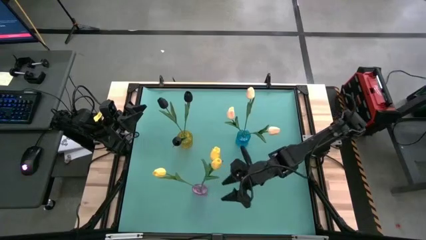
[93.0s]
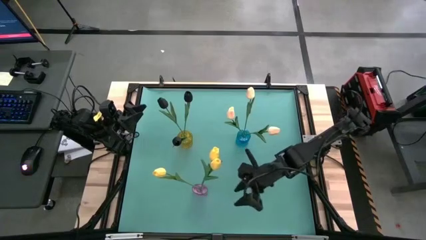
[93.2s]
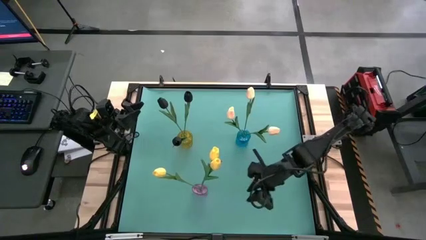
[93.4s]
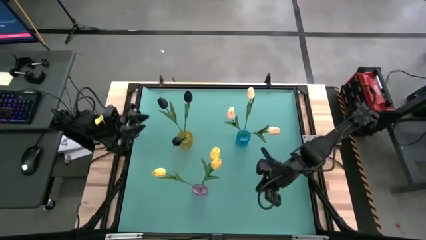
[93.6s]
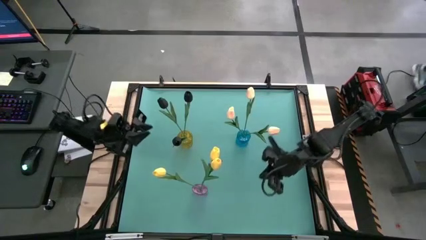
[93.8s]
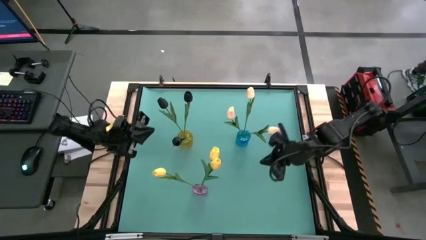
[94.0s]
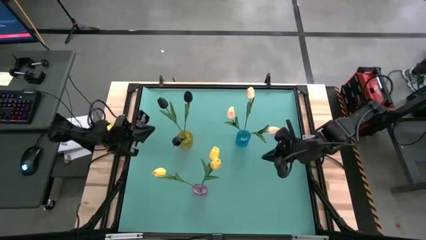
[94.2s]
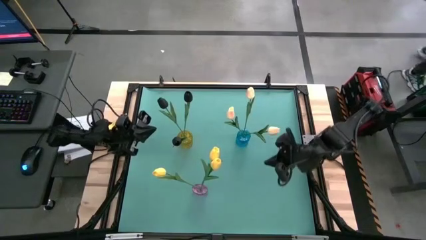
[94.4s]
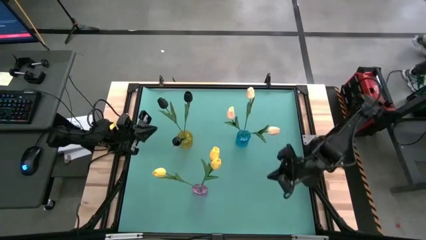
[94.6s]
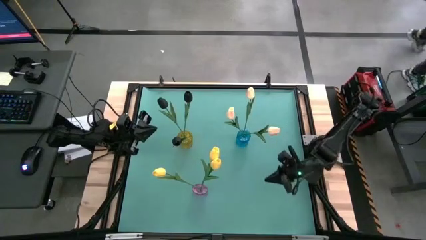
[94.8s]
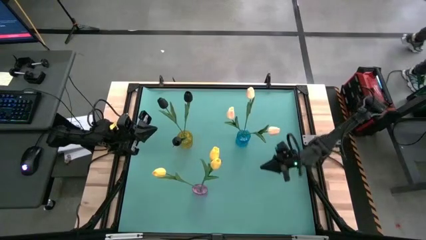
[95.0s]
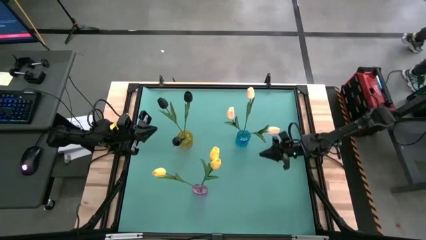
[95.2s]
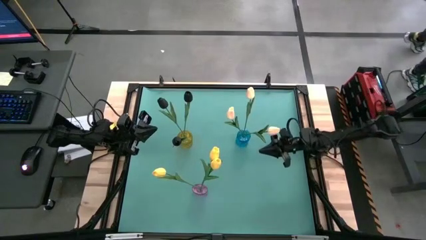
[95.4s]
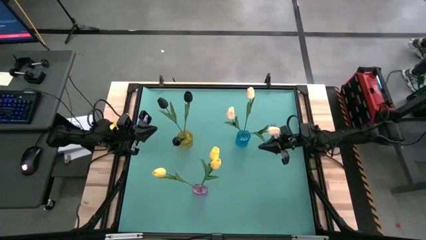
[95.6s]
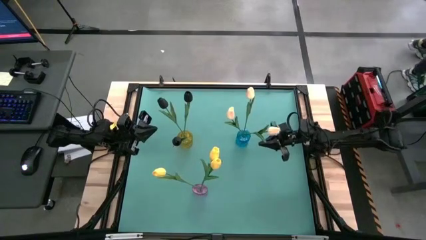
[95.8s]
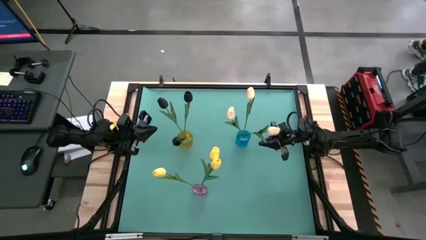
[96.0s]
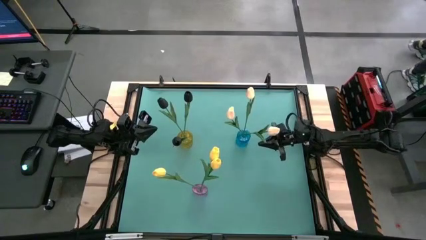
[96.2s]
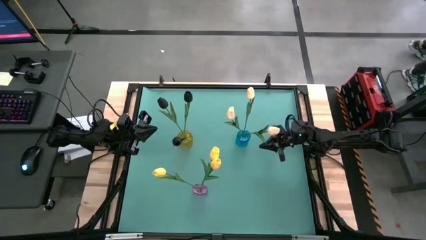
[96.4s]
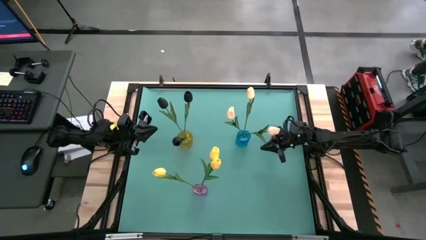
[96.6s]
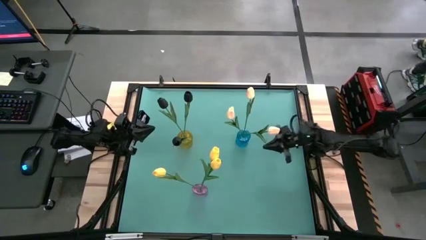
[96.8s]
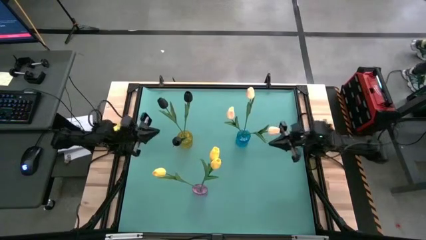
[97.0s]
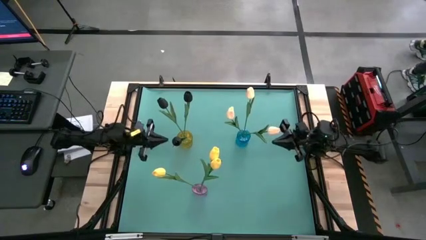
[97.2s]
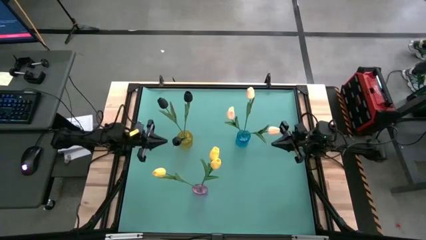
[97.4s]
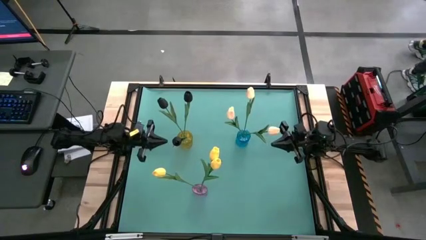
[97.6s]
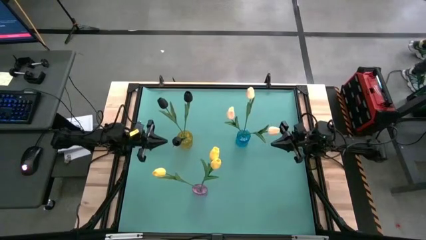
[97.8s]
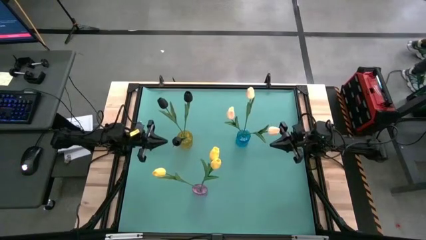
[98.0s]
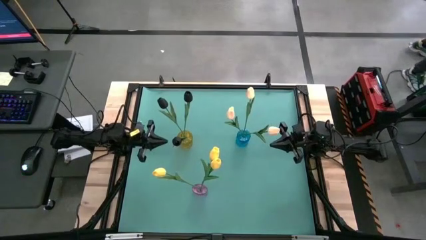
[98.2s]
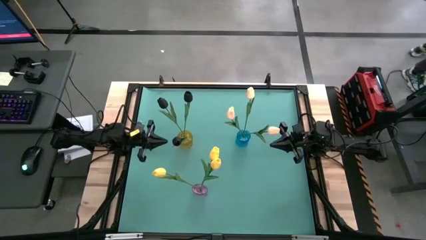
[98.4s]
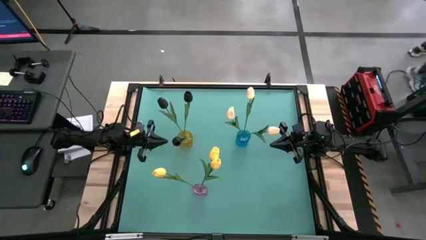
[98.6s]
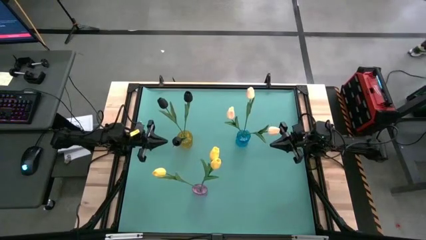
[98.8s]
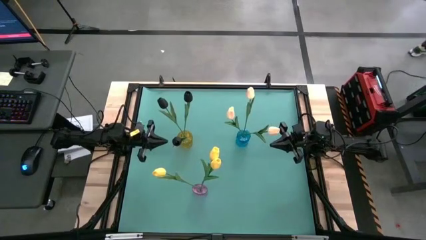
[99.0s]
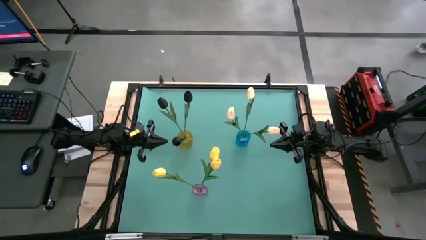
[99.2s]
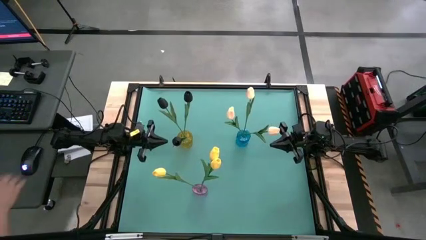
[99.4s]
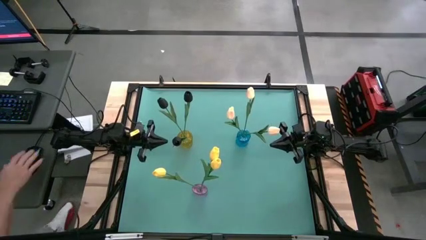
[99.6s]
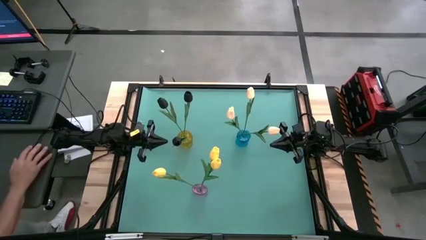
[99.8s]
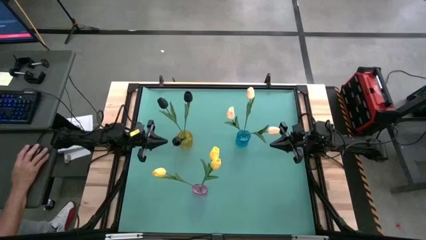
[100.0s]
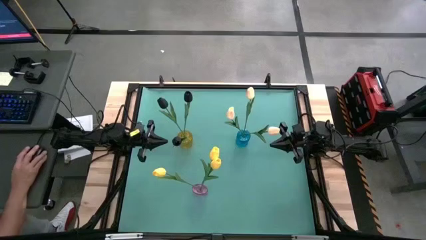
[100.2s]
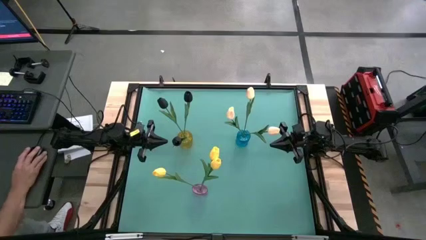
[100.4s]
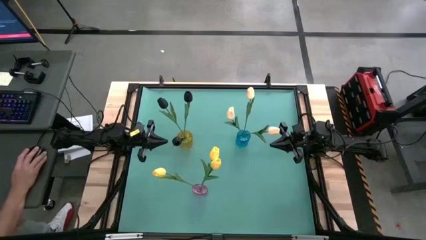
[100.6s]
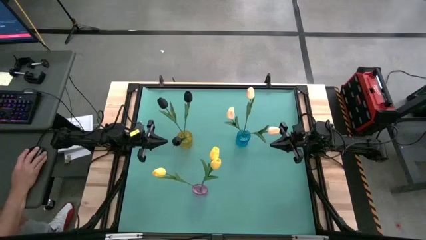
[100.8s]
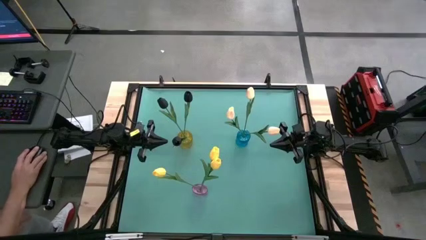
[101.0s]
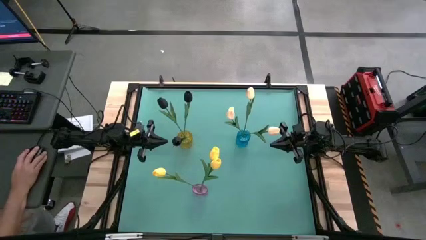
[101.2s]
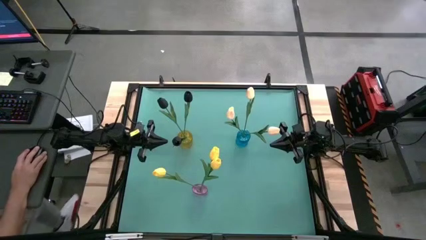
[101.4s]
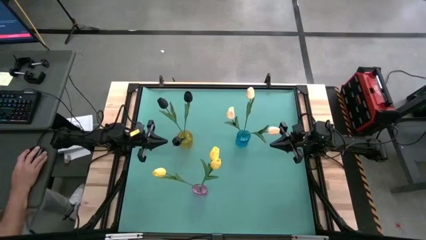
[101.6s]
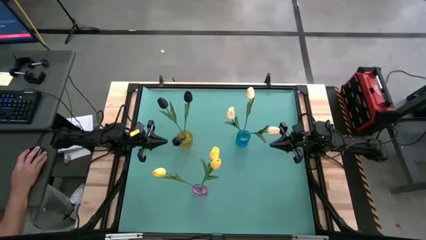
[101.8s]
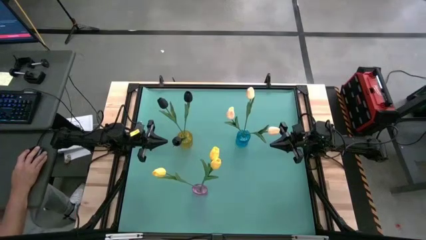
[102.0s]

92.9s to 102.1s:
Task: Sort flowers into vase by color
Return to Home Position

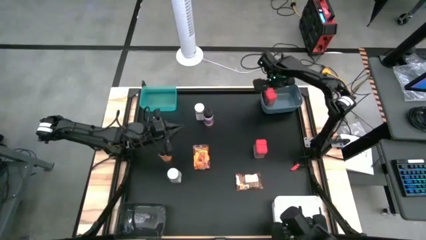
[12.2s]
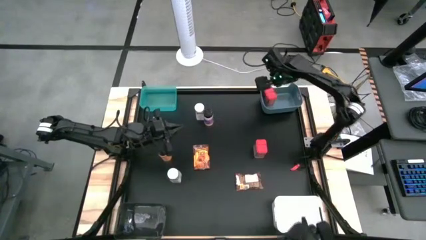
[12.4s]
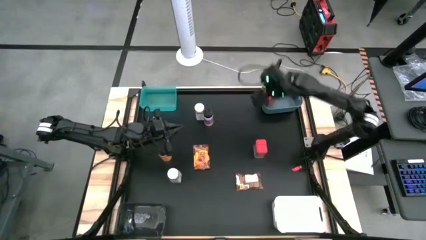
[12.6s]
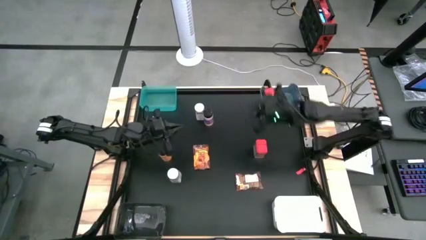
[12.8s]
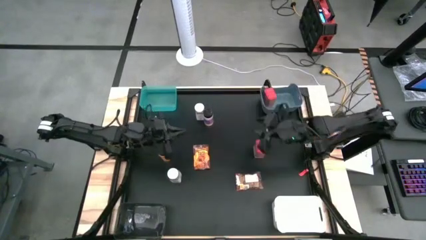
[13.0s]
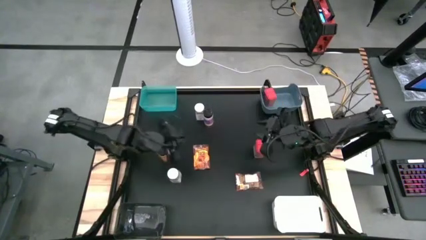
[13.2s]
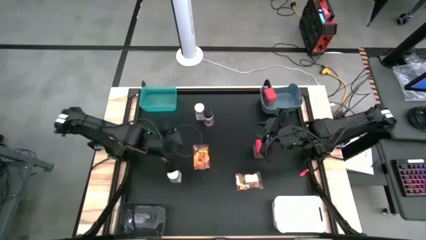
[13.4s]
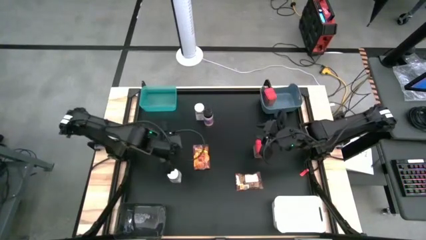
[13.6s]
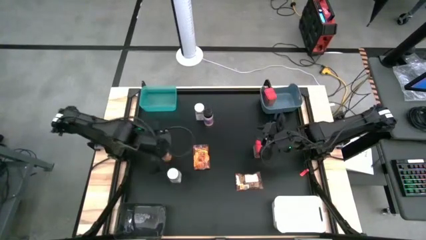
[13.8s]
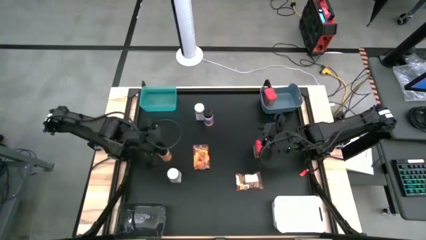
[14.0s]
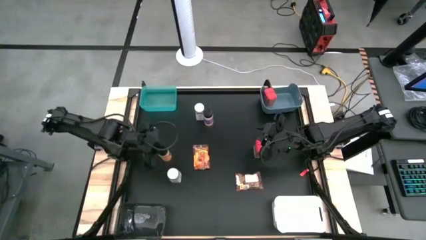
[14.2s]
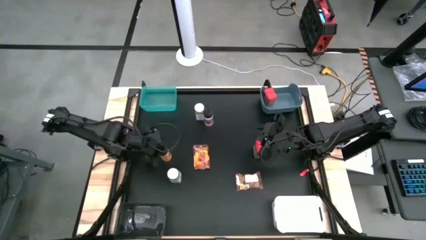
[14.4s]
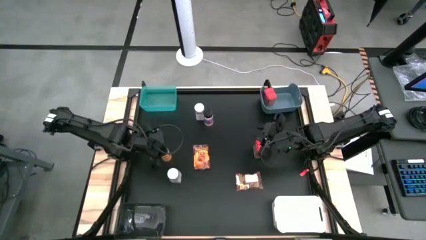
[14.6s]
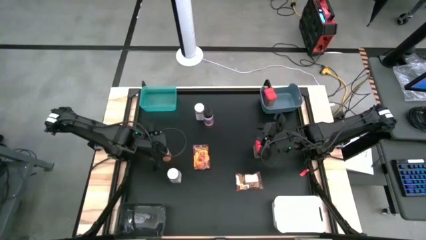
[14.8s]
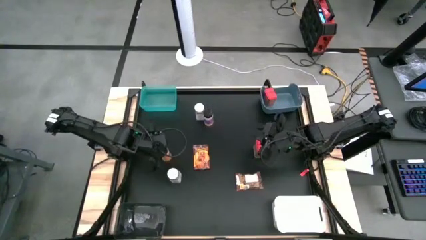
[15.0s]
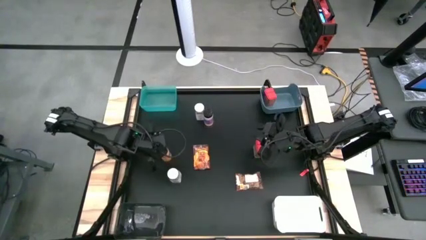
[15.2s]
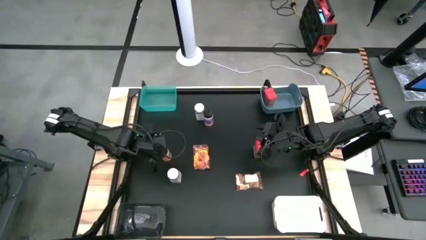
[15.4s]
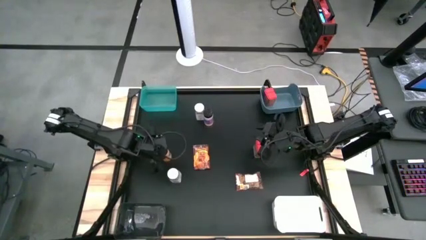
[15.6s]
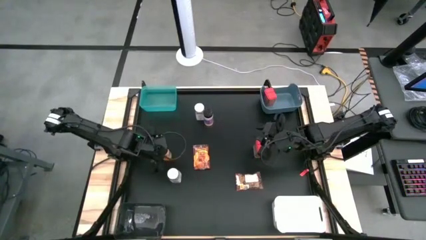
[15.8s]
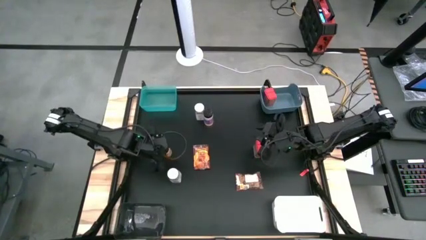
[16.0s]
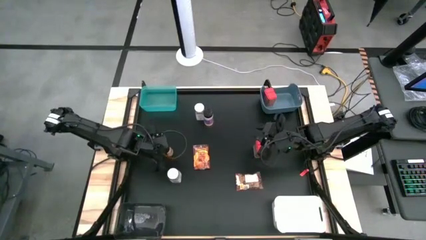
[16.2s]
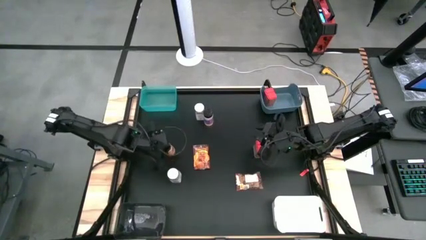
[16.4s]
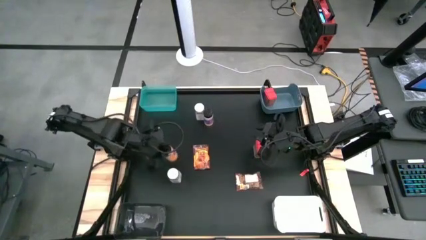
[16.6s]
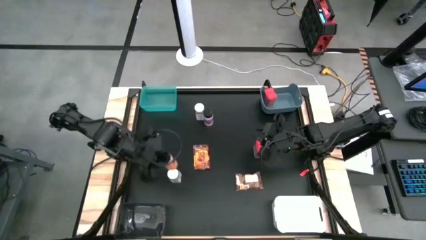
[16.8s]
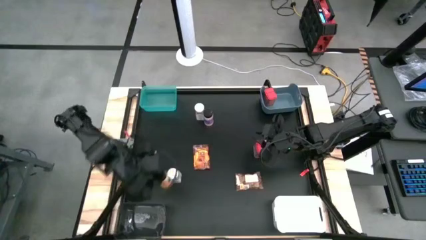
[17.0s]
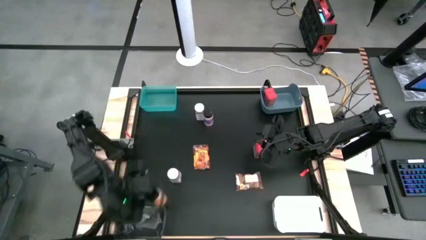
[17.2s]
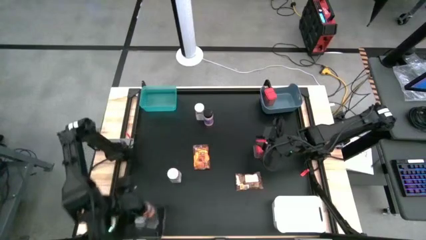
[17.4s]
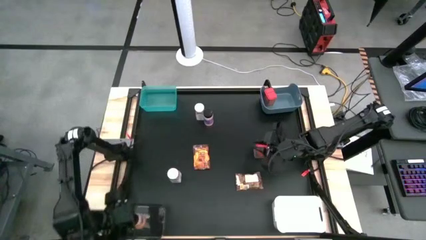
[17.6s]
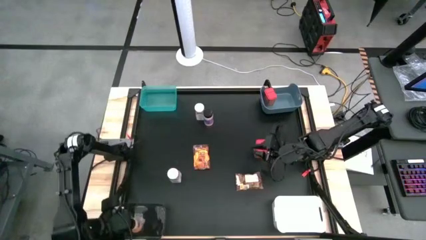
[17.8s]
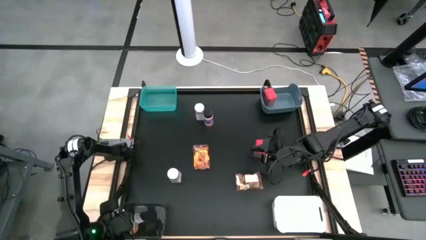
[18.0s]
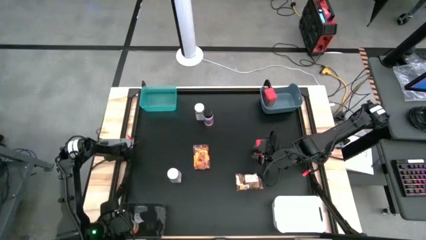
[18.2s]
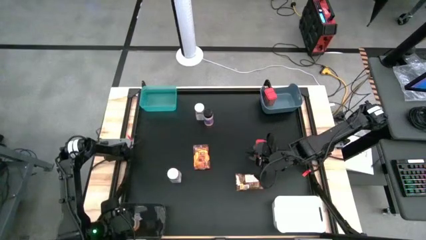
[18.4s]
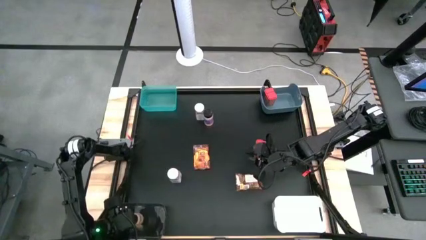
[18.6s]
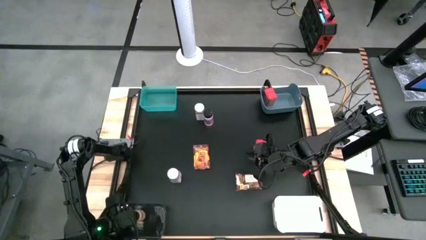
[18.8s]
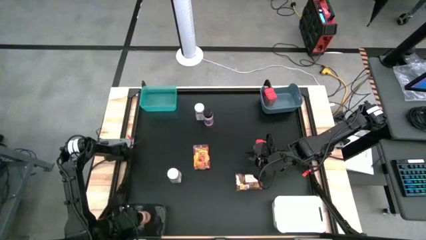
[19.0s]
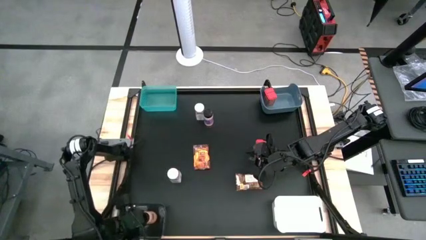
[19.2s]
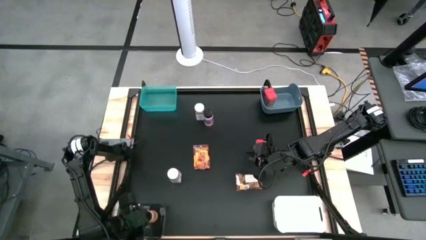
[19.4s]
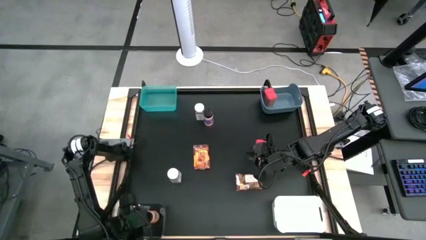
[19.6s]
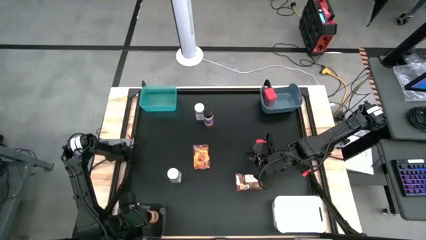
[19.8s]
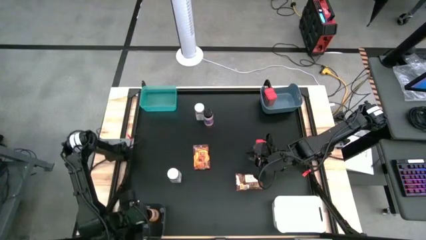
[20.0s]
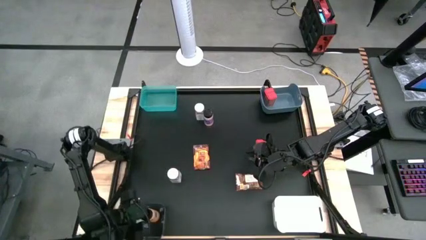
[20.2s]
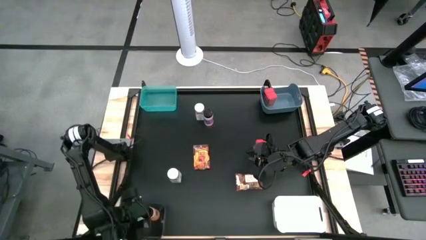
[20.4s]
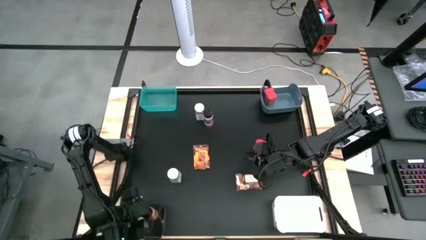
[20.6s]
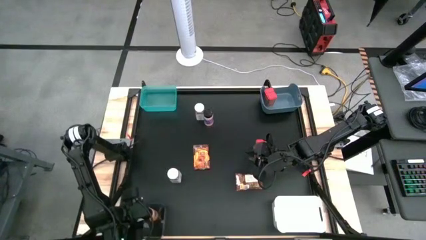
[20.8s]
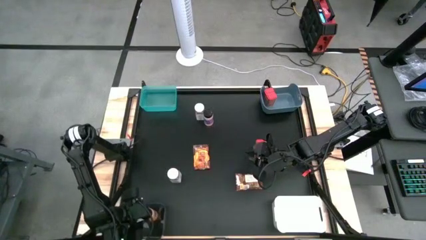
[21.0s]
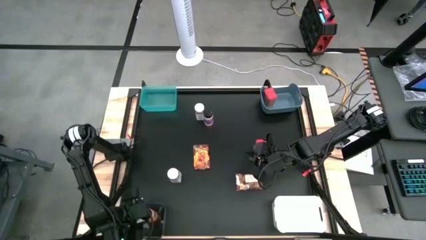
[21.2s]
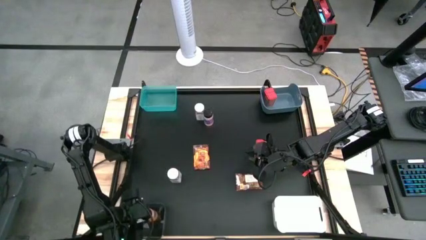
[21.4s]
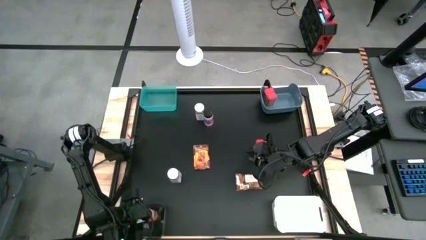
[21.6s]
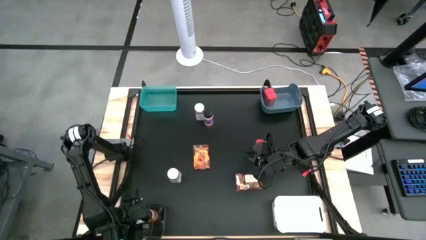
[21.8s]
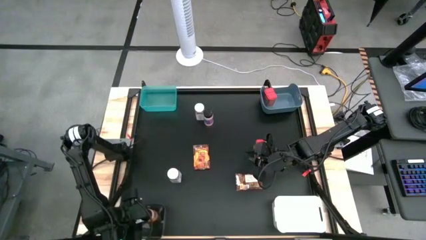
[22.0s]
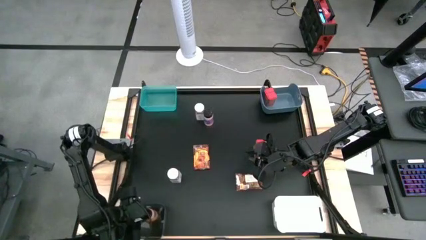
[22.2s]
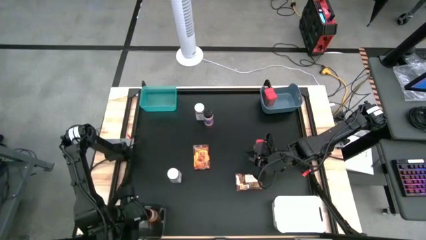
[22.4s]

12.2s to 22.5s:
Task: Sort spices by type
Put the bottom black seasoning bottle into the black bin
